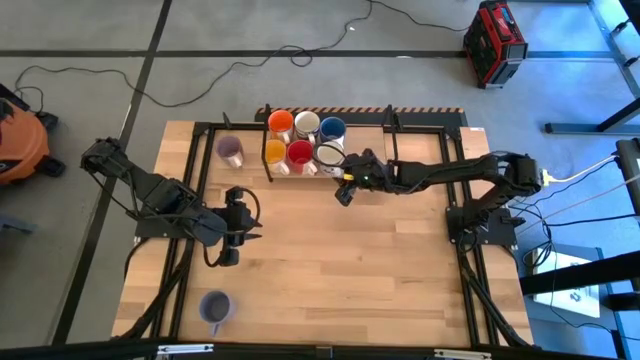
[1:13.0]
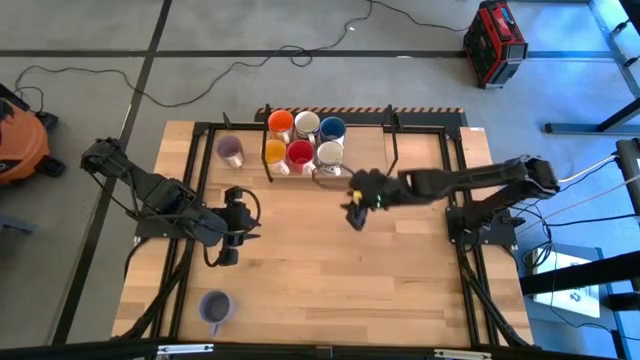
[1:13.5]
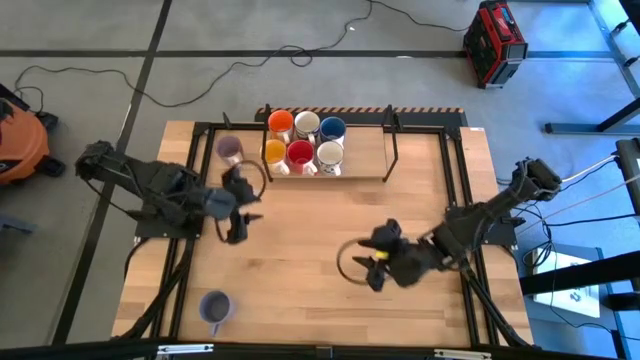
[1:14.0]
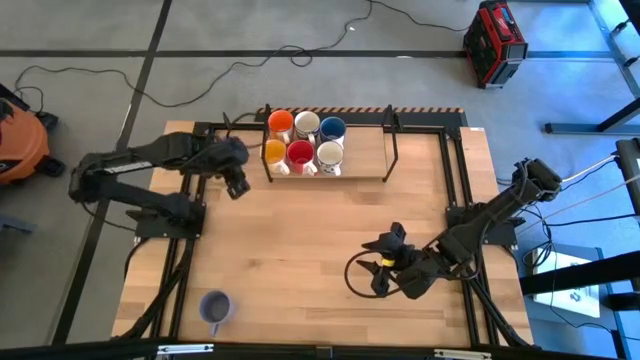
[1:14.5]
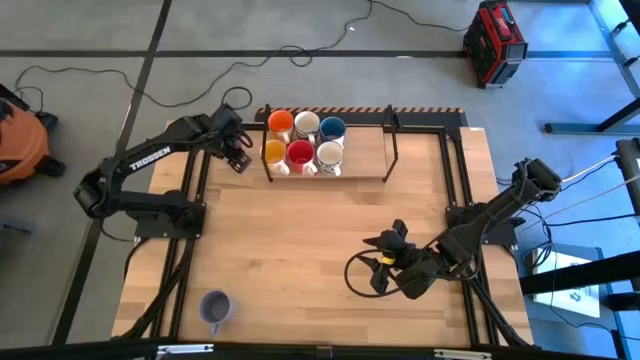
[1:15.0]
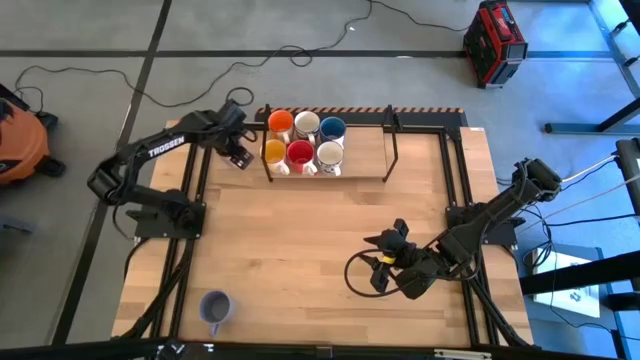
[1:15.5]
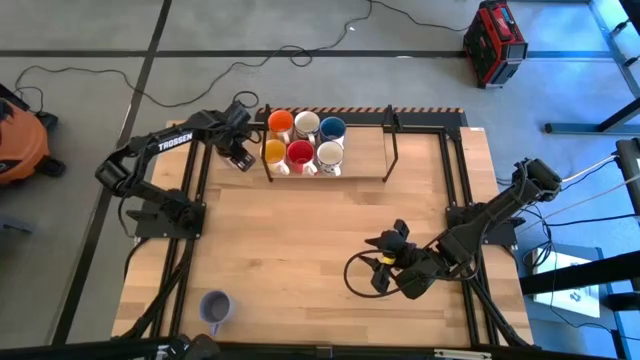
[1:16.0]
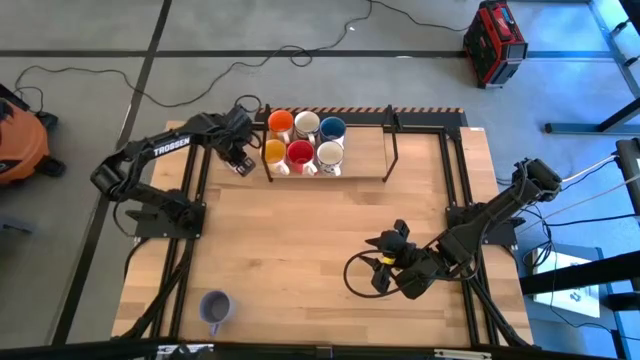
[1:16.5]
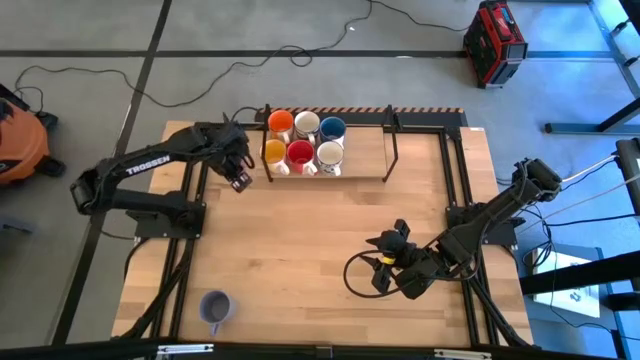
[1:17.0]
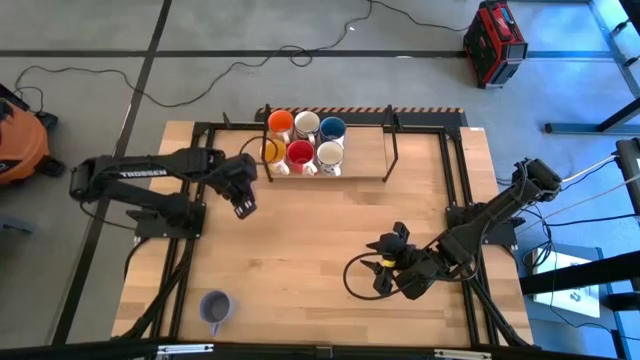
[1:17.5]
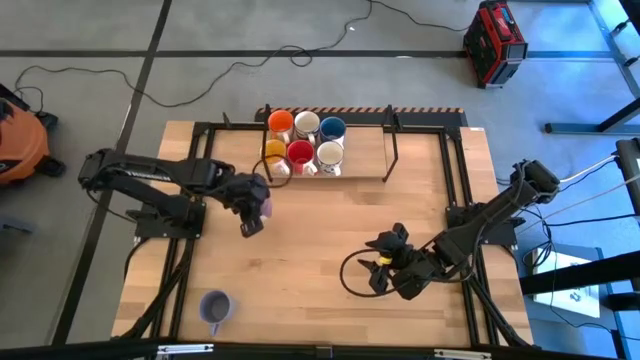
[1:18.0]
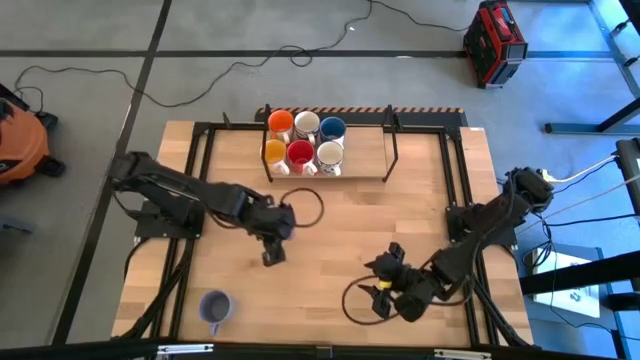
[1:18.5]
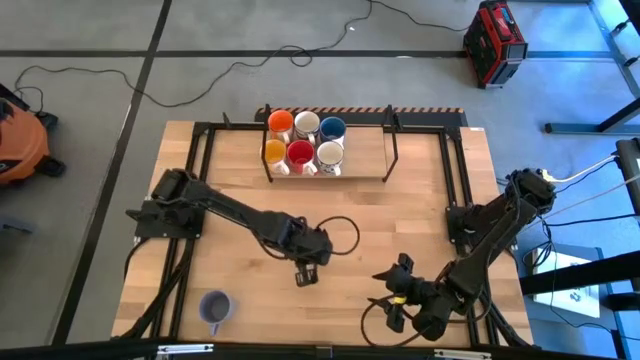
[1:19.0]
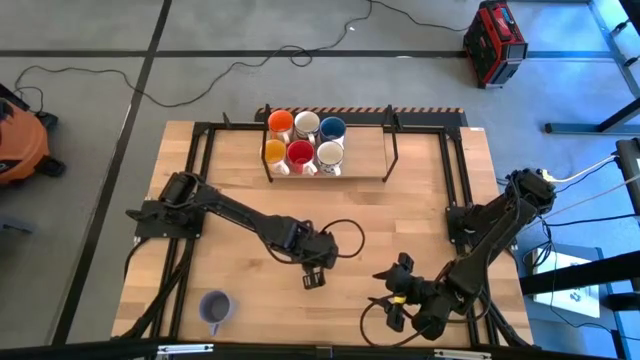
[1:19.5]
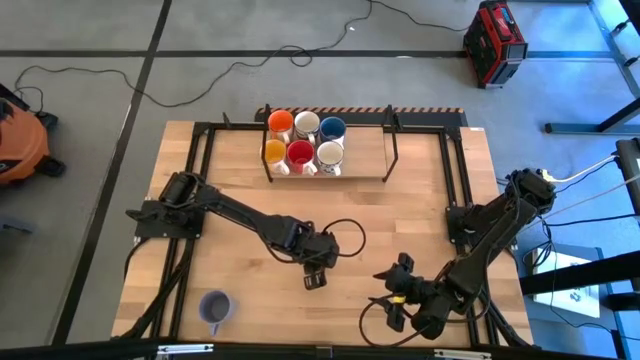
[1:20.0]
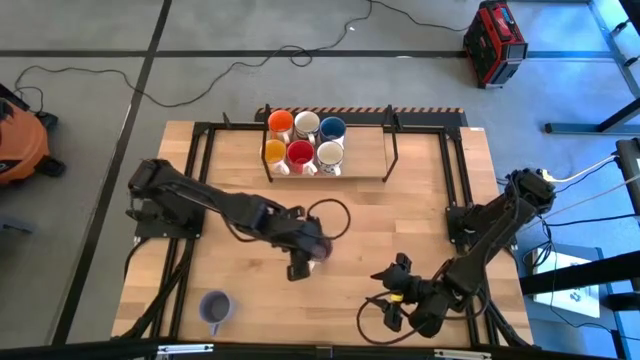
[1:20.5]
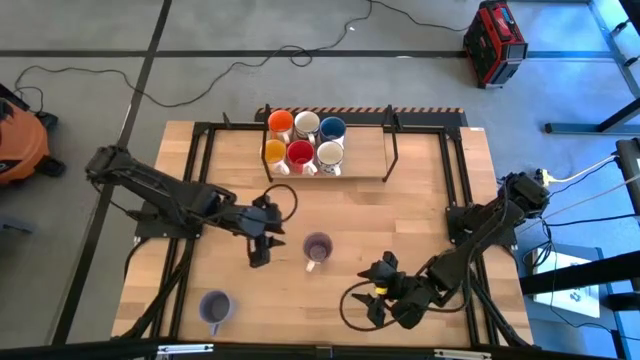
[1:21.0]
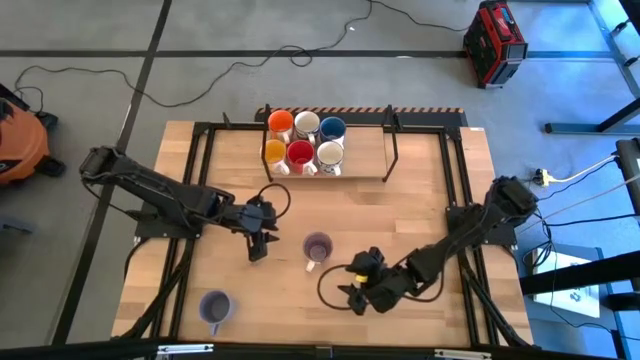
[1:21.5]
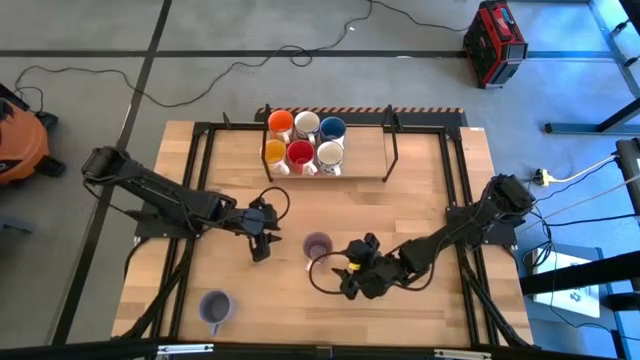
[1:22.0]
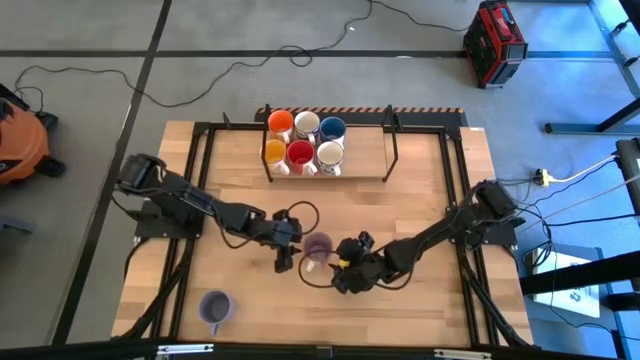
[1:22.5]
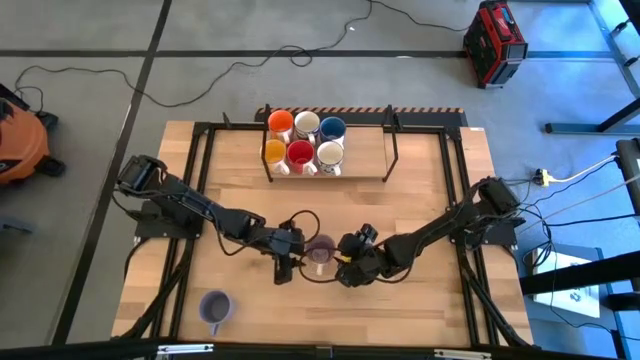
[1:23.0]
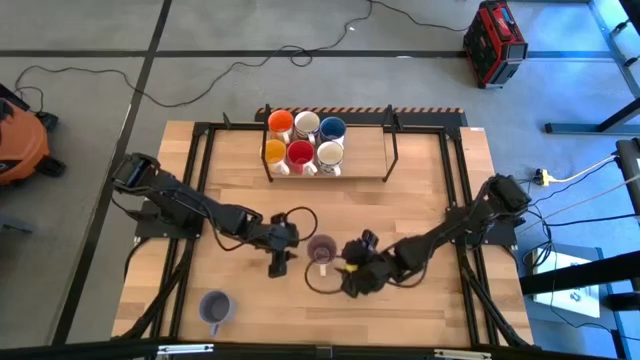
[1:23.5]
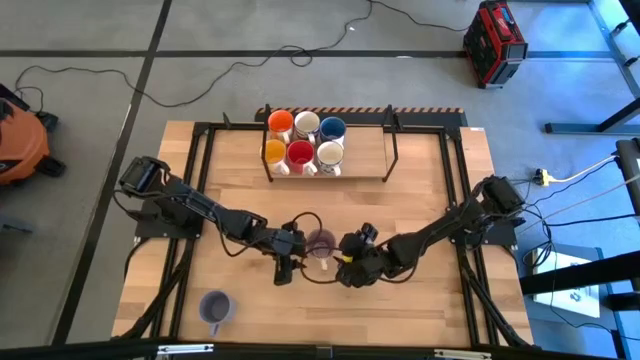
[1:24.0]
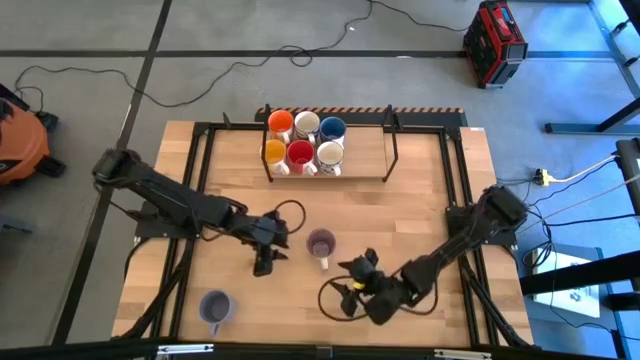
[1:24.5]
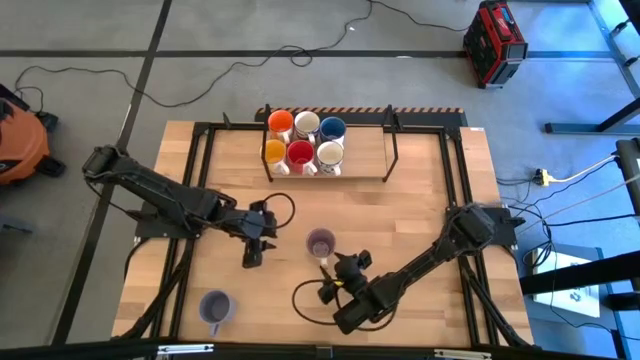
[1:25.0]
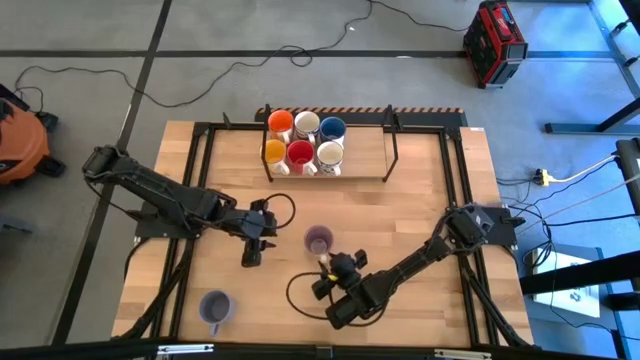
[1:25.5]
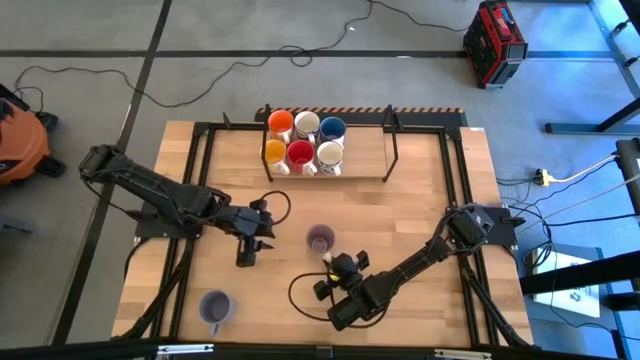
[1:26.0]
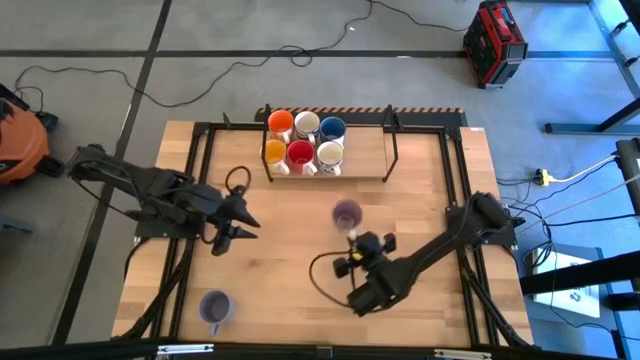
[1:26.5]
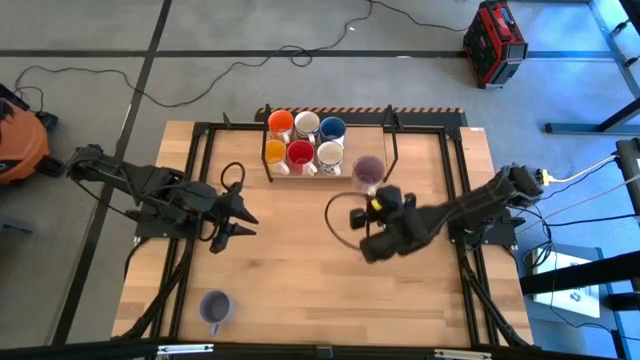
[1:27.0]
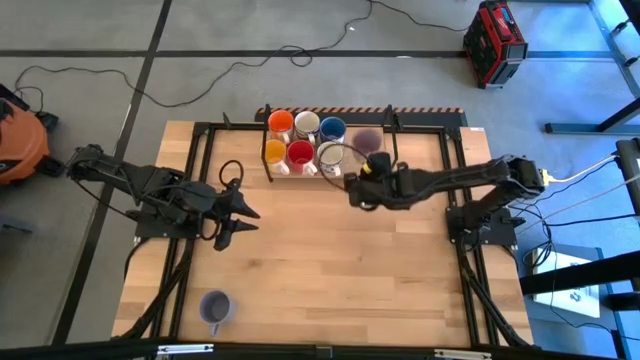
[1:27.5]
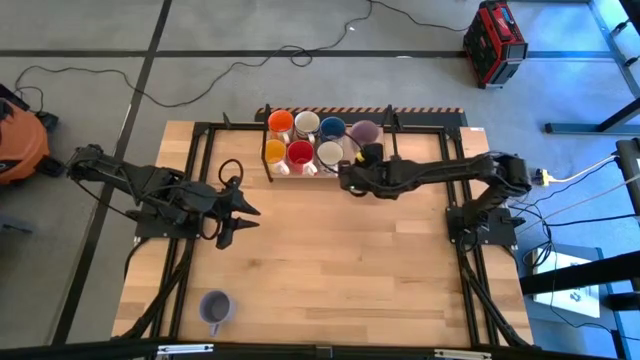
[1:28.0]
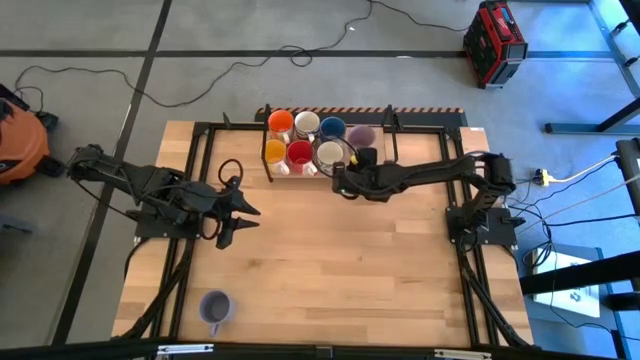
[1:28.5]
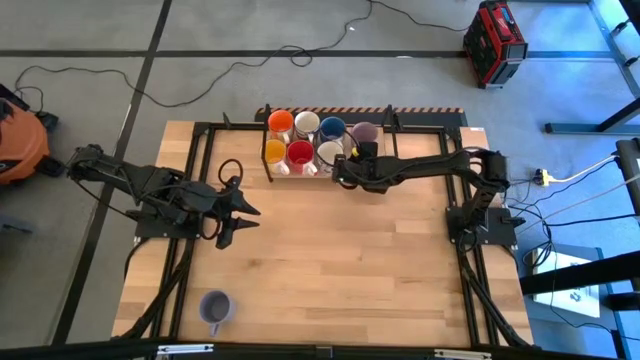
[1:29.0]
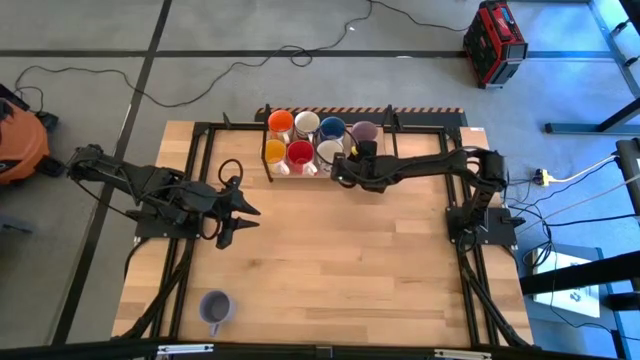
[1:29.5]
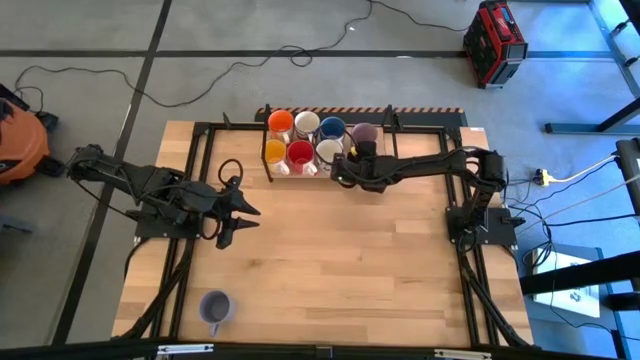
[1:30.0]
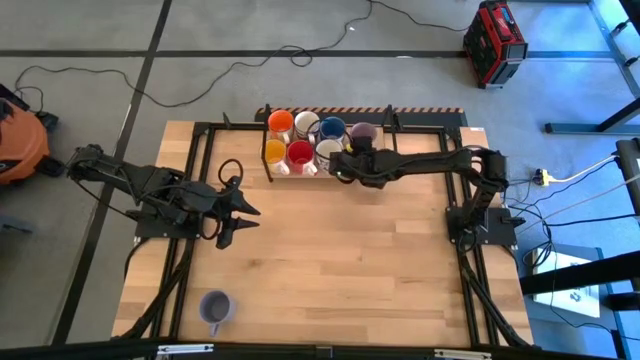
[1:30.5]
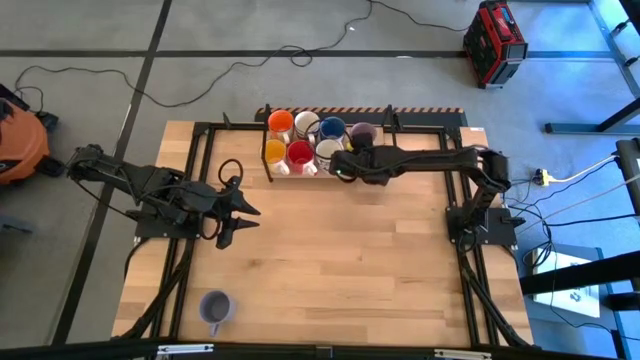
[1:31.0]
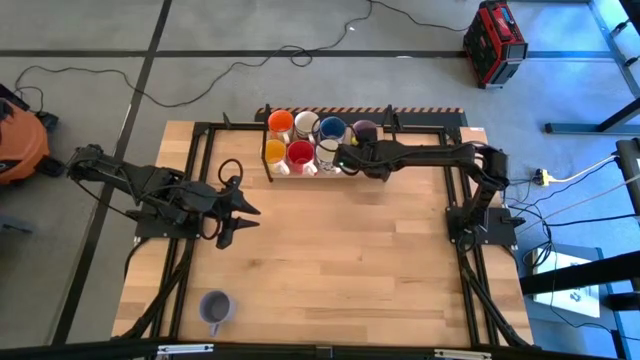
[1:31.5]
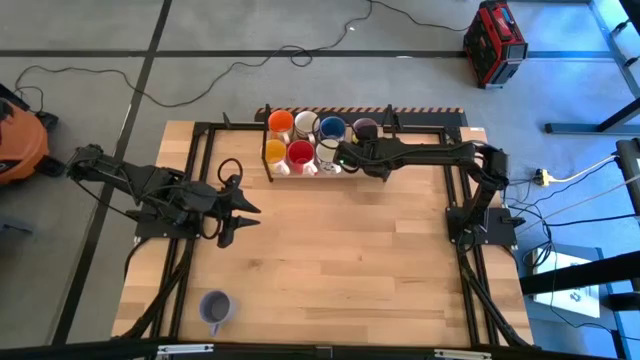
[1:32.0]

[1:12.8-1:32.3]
Task: Place coffee mugs
Put the violet mug on the shelf
